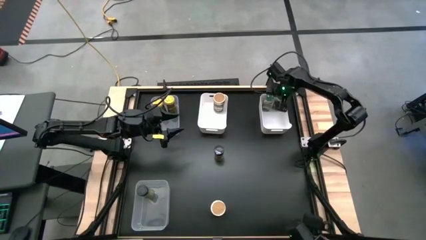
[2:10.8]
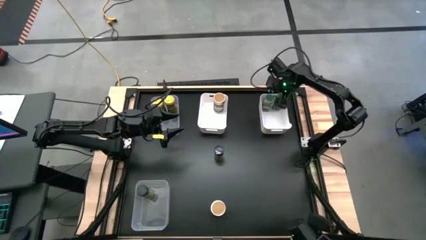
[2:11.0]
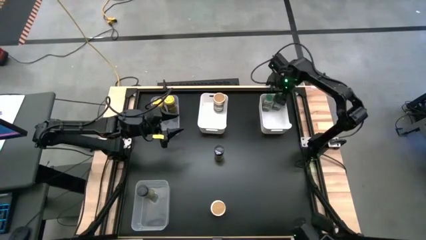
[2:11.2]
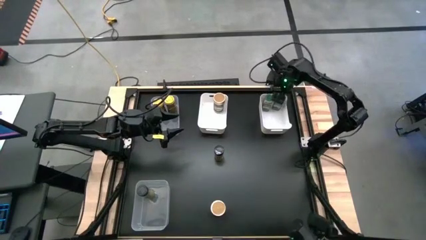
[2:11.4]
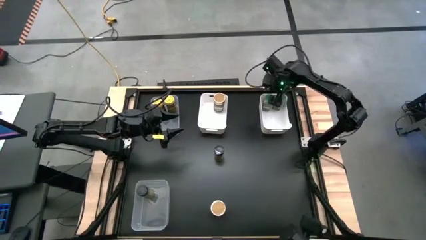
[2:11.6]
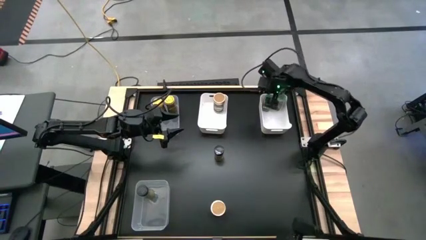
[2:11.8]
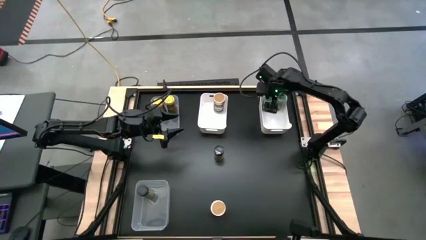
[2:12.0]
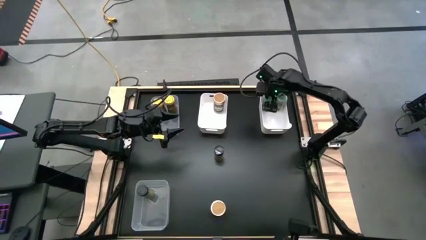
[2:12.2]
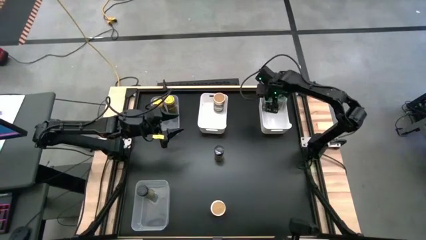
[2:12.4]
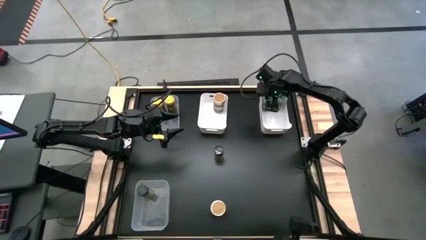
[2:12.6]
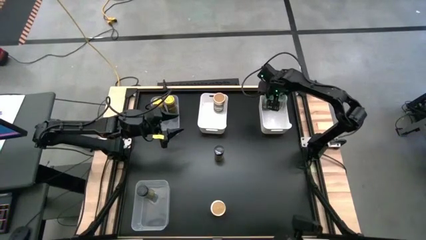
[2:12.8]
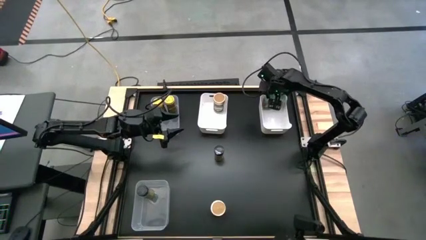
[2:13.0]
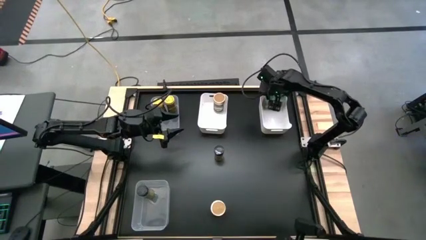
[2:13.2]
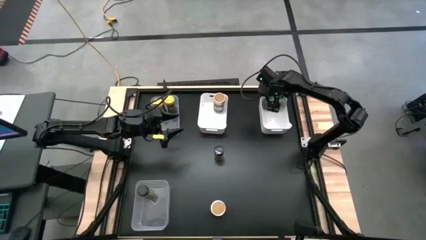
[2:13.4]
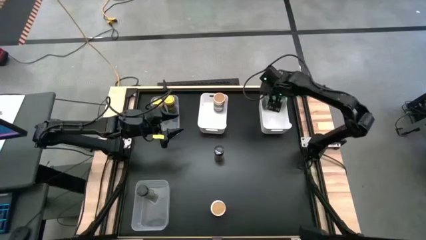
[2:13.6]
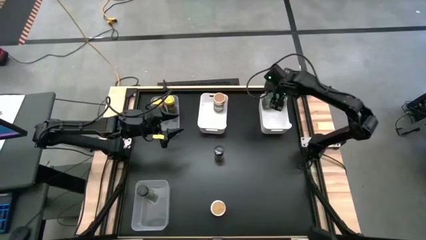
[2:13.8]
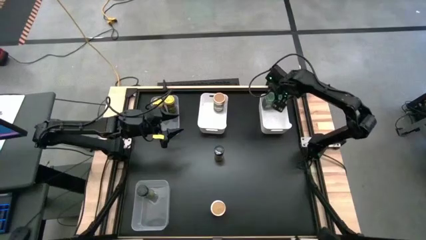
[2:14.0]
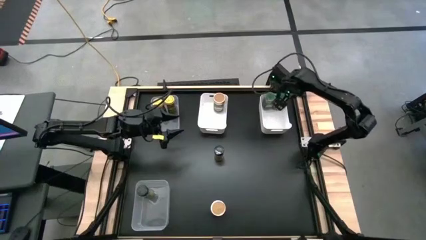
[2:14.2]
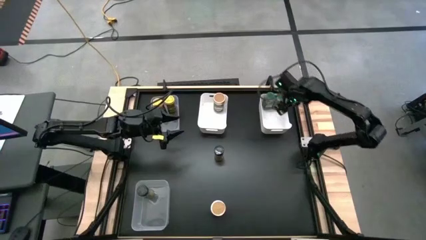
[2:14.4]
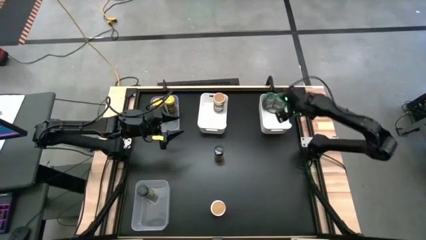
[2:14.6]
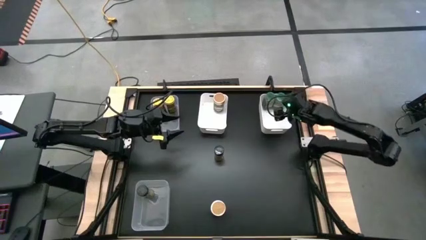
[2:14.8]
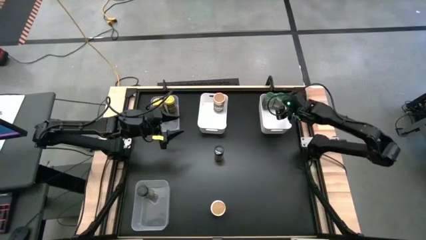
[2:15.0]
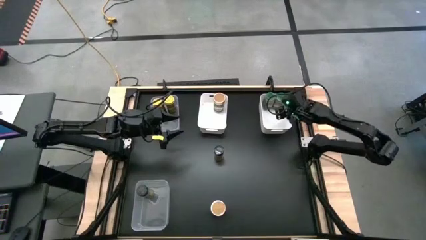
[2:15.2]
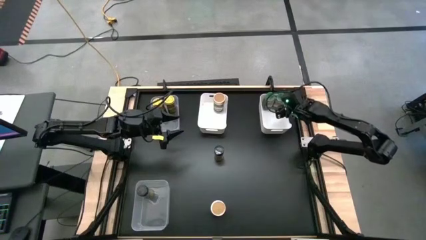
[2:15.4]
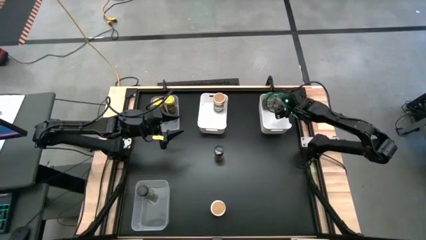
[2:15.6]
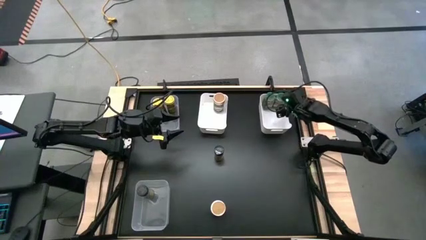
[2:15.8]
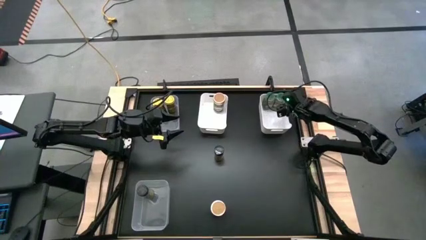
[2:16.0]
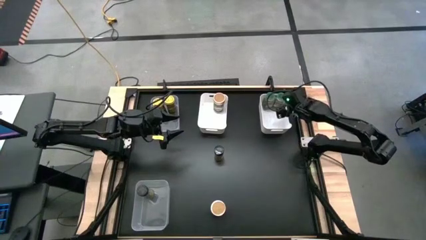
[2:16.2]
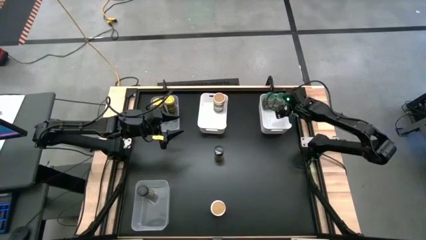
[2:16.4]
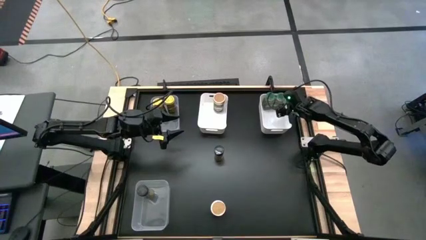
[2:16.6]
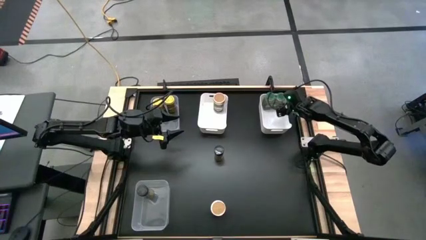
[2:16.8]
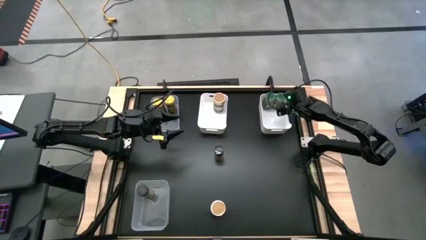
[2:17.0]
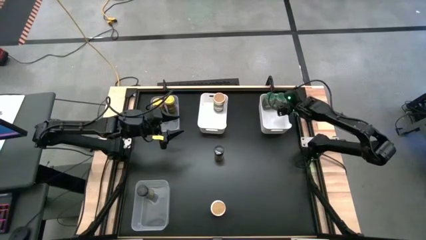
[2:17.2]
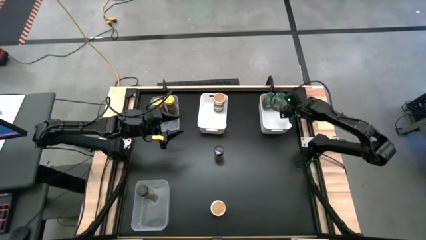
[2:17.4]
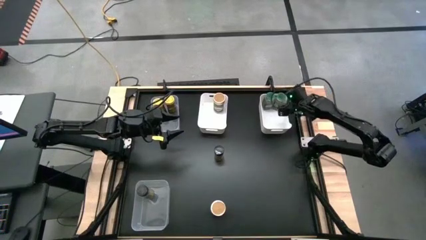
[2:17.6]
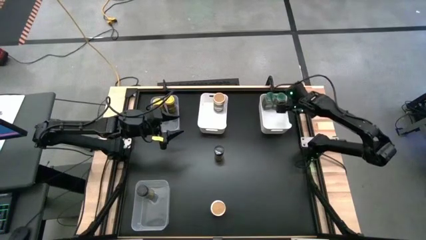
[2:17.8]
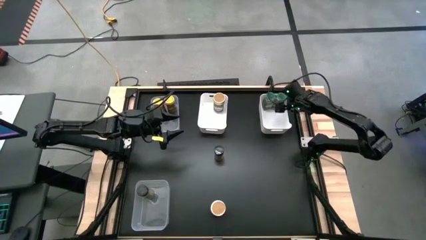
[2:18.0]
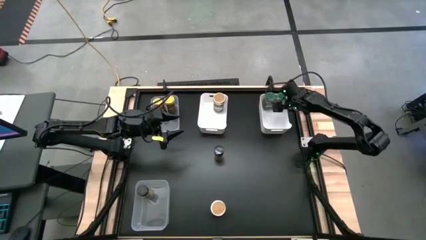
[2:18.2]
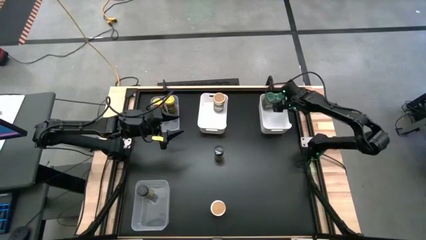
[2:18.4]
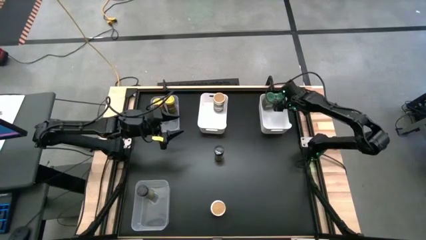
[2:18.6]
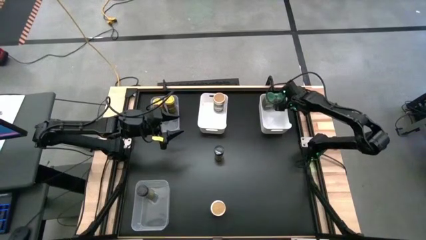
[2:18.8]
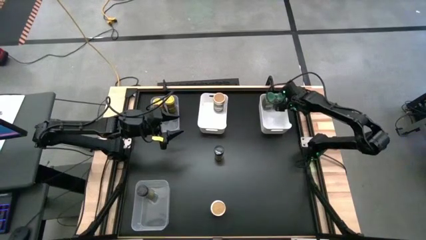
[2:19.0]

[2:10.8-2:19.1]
Task: Sort spices by type
Adjust the green spice bottles

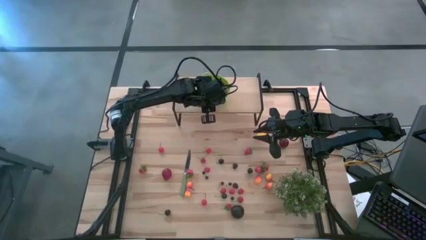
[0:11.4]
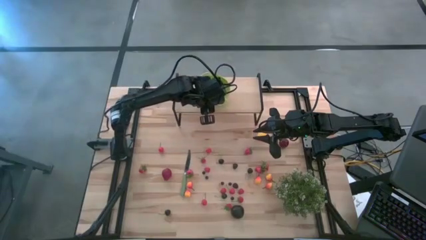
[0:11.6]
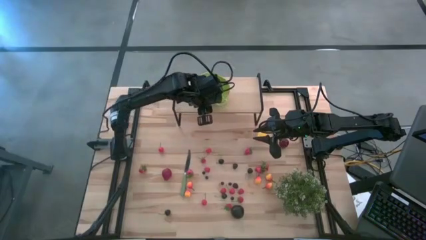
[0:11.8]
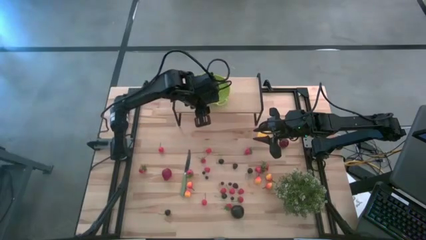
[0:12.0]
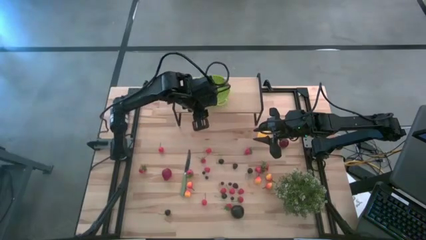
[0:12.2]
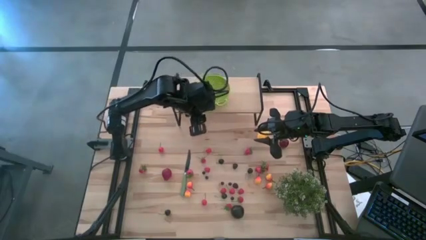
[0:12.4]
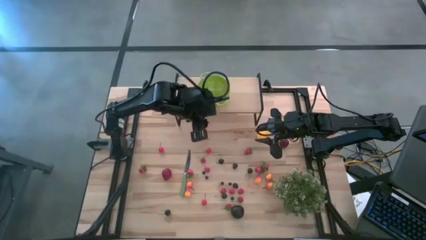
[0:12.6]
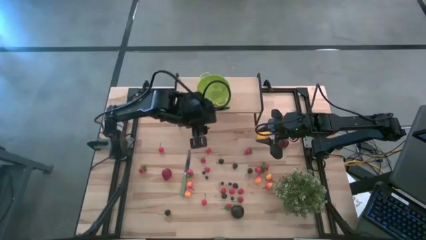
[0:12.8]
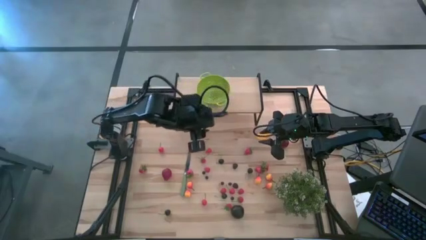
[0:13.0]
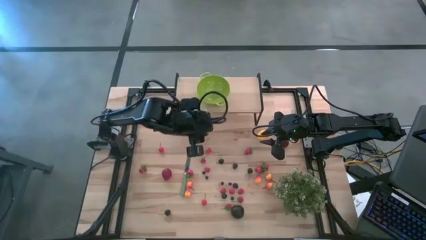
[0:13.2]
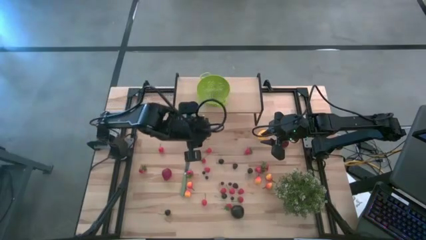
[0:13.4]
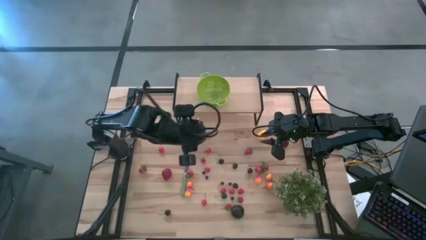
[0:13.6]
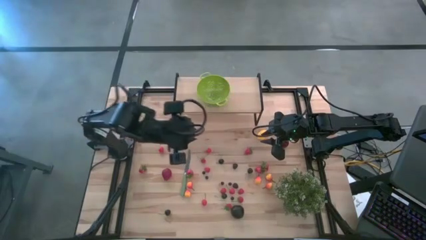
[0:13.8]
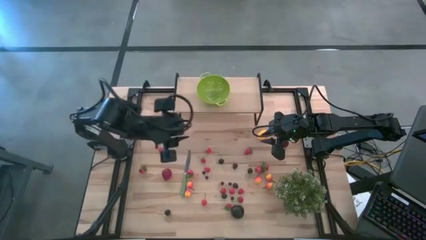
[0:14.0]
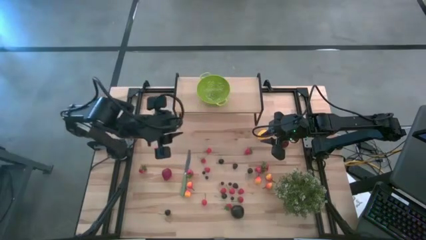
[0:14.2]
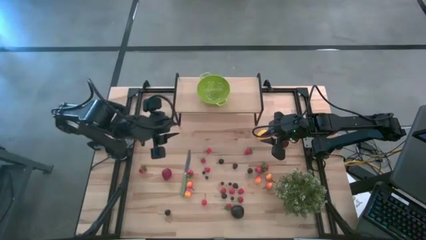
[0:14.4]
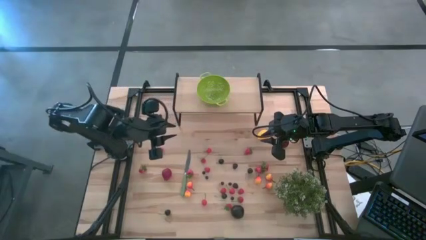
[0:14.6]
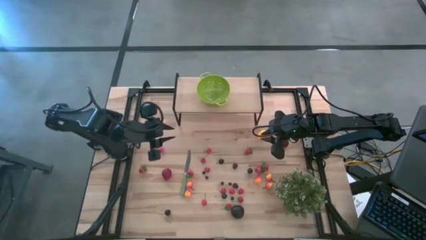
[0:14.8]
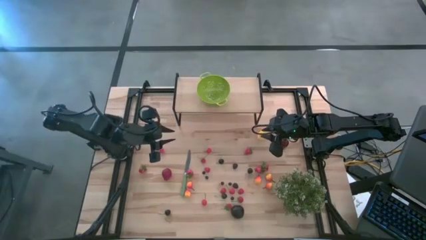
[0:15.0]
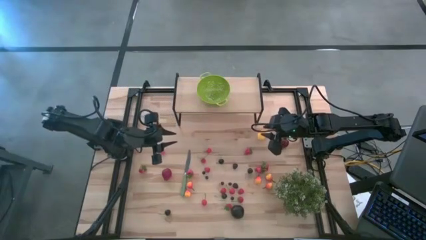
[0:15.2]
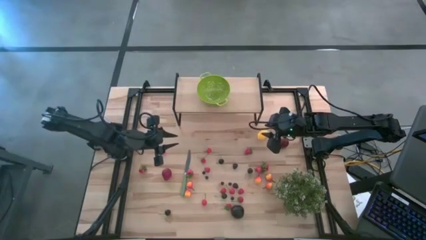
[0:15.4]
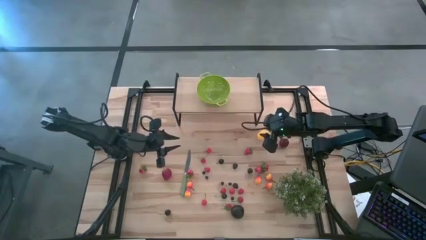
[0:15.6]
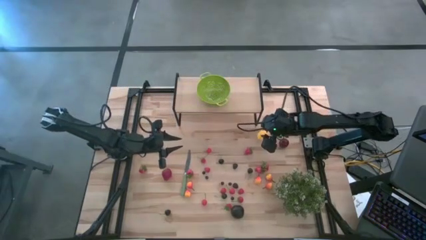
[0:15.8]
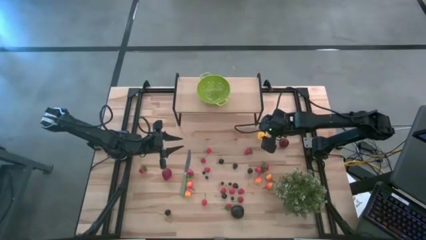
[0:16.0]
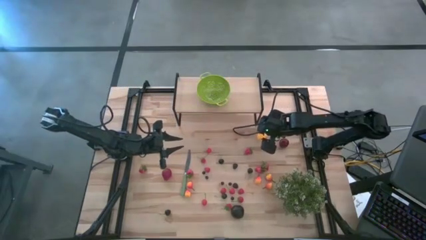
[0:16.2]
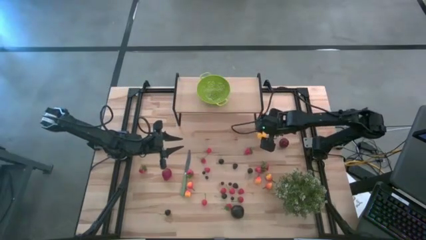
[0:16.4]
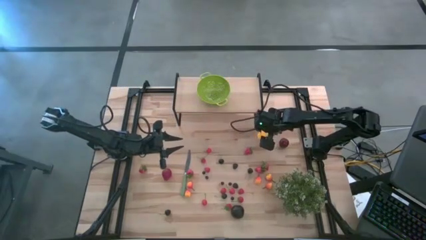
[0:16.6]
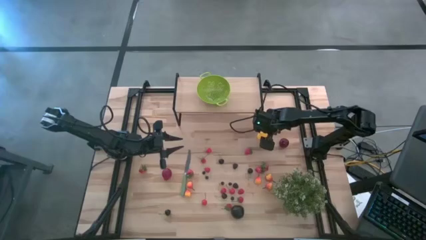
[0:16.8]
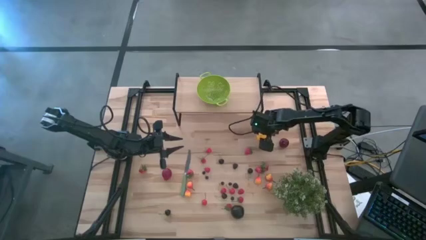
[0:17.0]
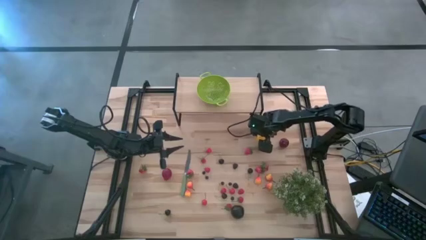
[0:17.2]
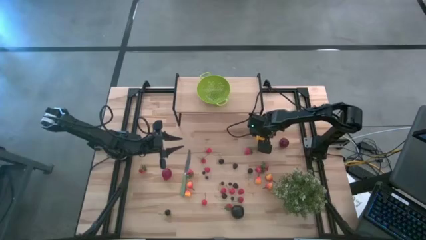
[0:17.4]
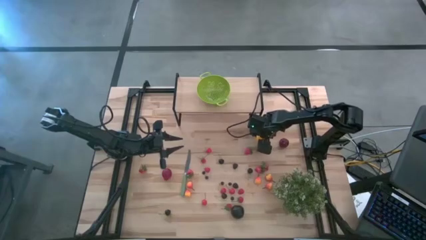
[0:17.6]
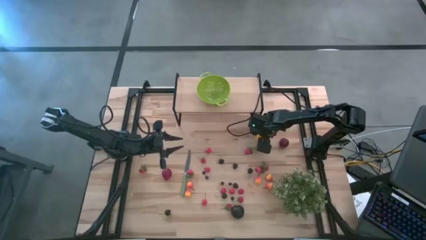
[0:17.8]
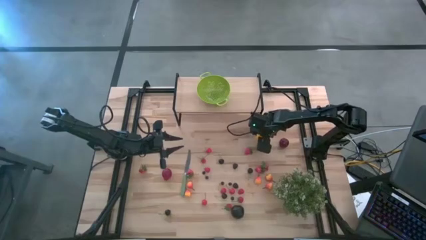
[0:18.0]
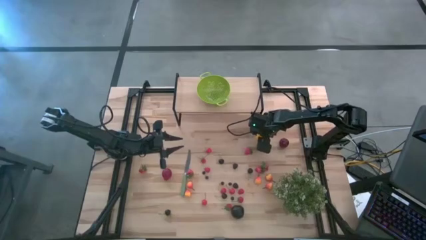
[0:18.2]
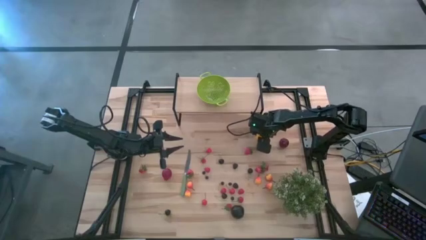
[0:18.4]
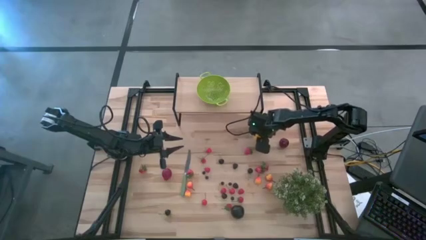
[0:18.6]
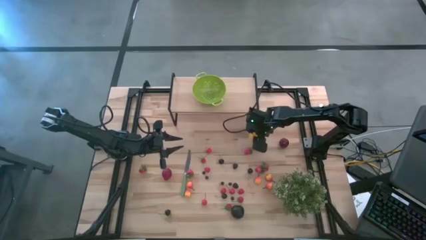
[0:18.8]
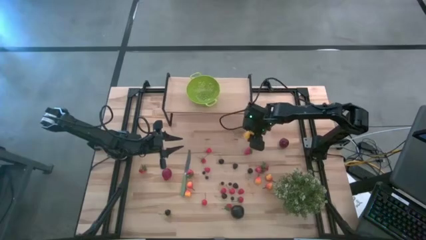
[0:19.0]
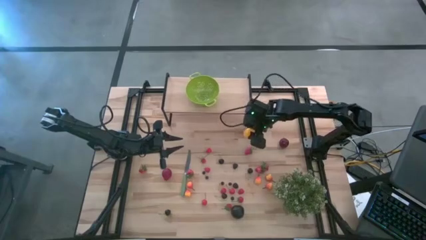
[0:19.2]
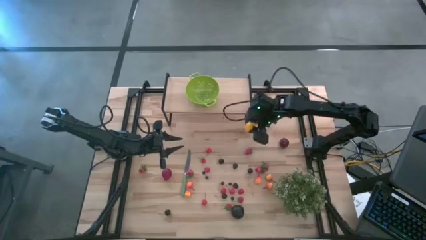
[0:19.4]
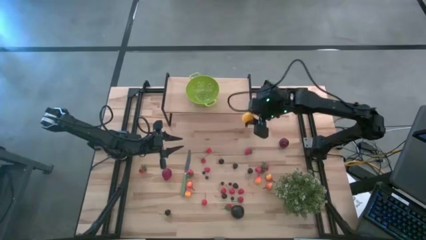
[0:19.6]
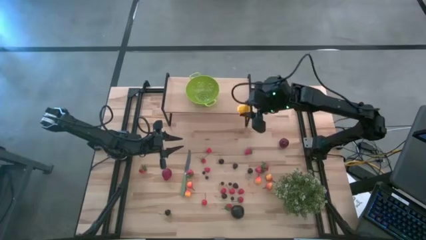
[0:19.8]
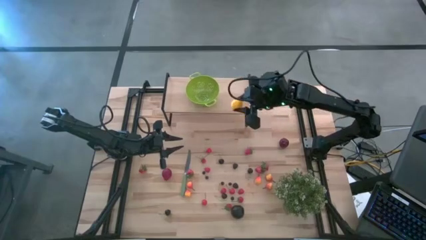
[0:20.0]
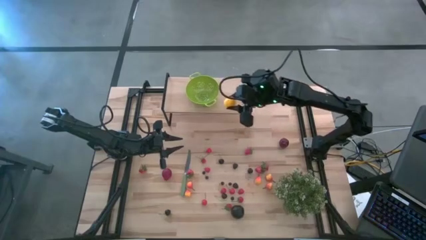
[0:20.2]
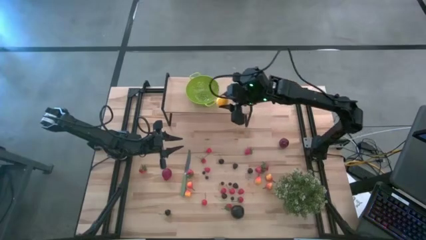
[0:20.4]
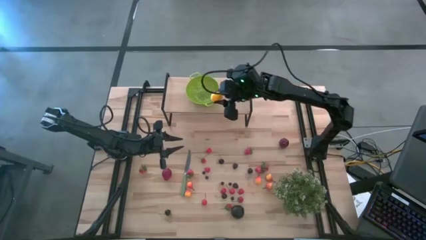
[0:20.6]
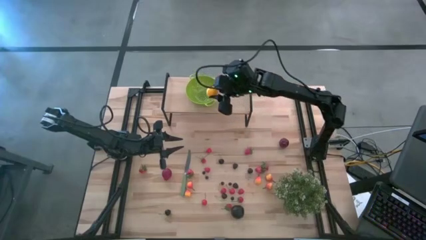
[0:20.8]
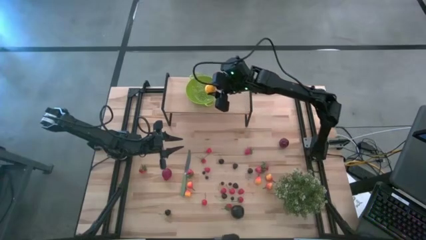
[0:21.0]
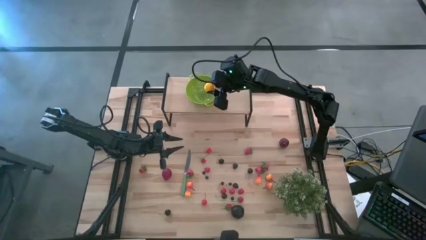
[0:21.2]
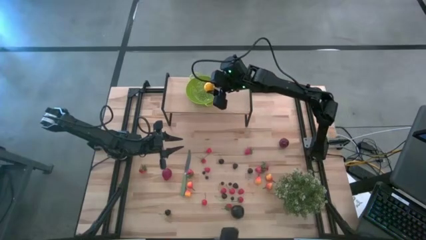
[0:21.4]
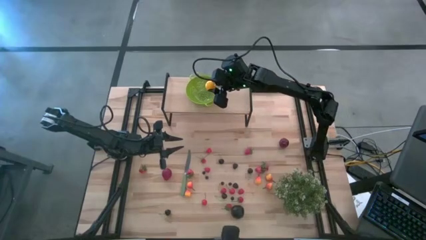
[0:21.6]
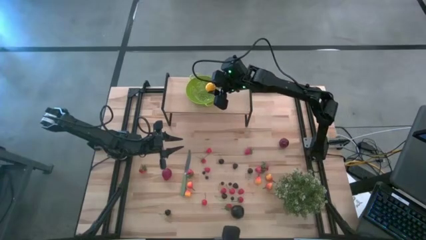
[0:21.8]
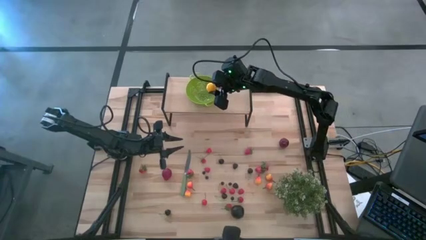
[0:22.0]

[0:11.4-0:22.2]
Task: Pick & Place Fruit
Put the mango into the green colander on the shelf
